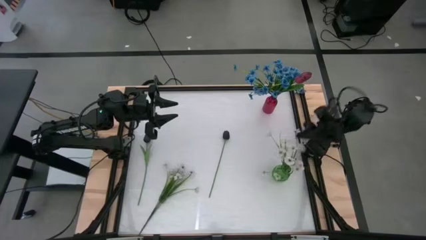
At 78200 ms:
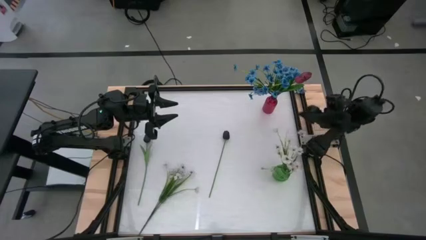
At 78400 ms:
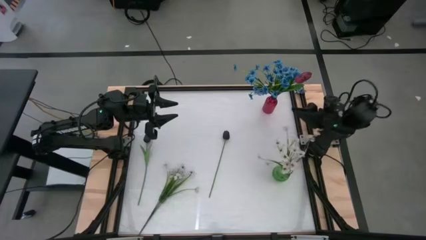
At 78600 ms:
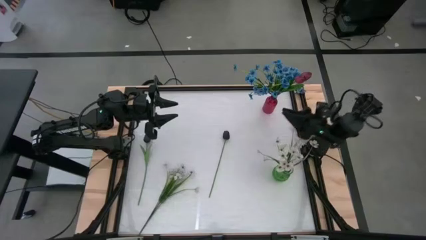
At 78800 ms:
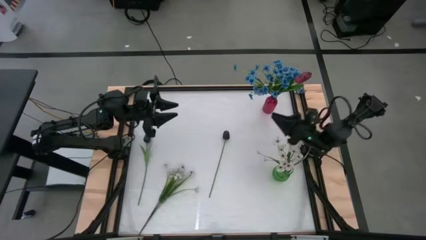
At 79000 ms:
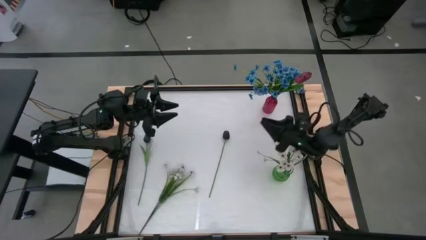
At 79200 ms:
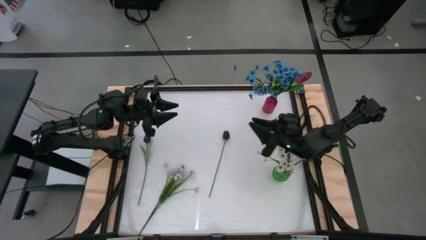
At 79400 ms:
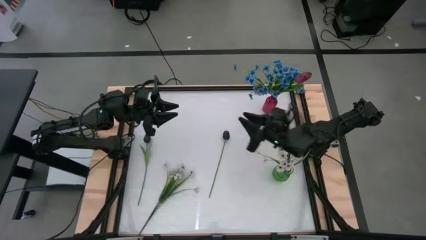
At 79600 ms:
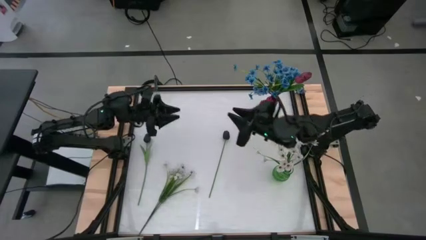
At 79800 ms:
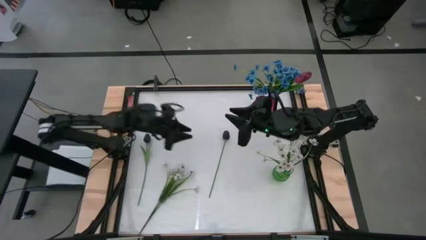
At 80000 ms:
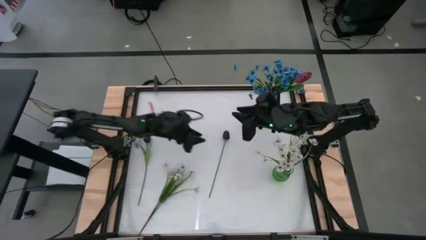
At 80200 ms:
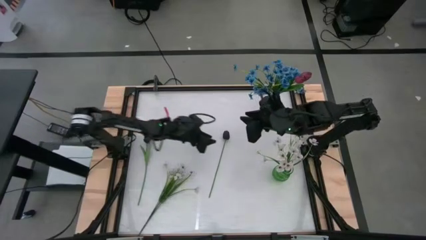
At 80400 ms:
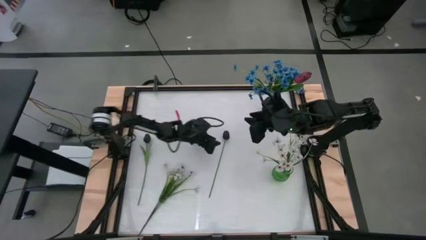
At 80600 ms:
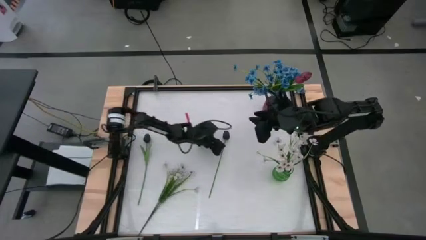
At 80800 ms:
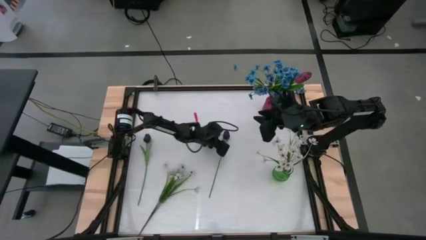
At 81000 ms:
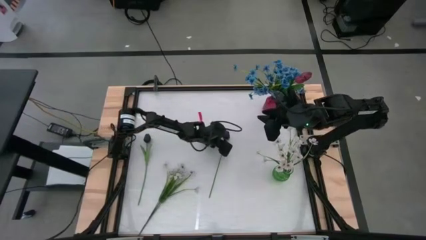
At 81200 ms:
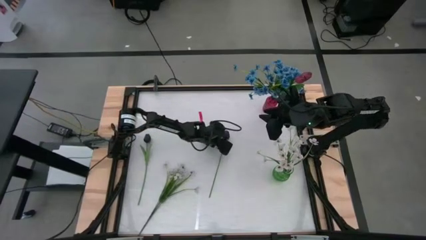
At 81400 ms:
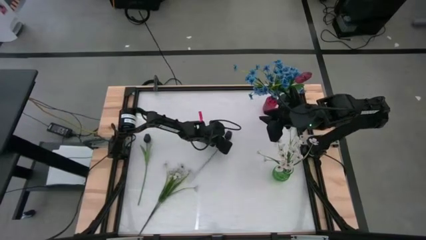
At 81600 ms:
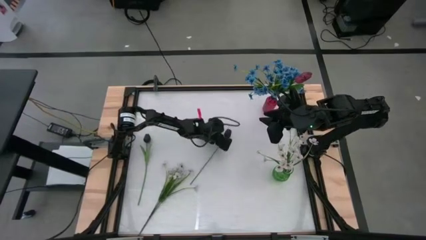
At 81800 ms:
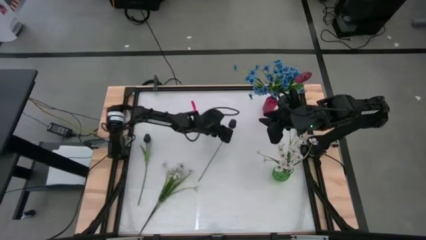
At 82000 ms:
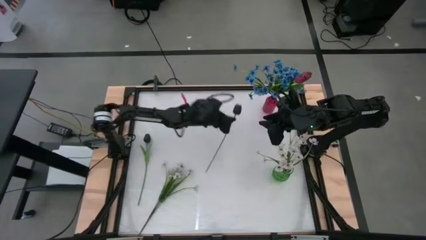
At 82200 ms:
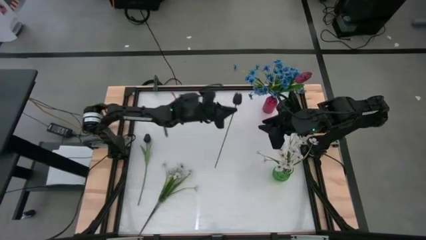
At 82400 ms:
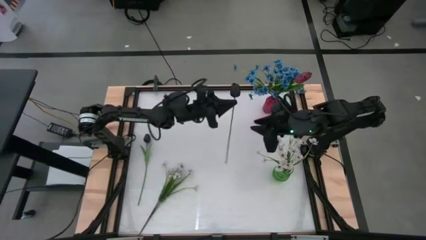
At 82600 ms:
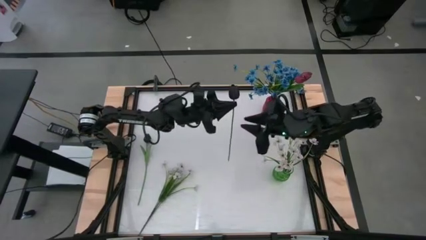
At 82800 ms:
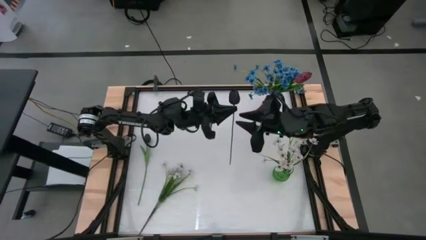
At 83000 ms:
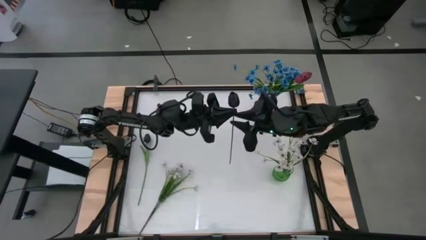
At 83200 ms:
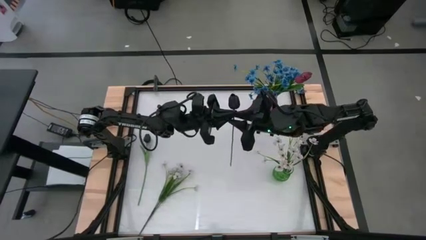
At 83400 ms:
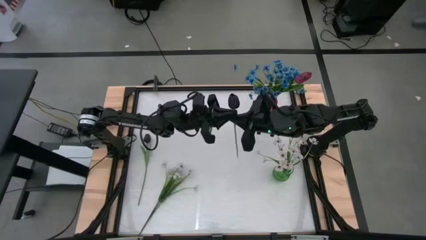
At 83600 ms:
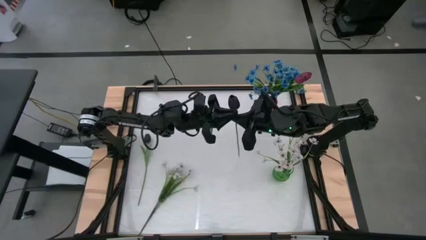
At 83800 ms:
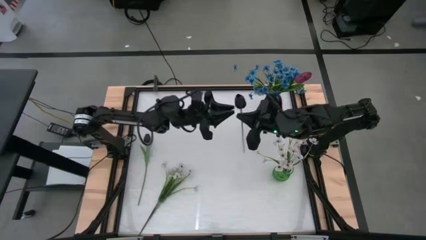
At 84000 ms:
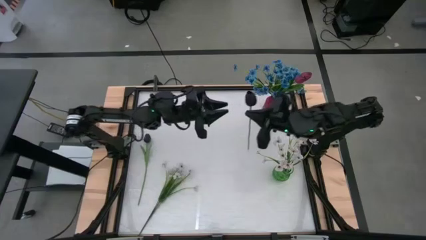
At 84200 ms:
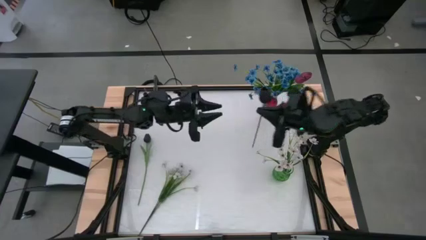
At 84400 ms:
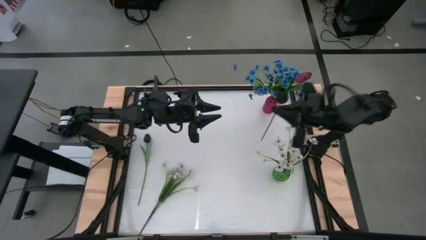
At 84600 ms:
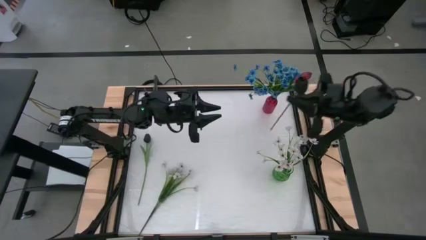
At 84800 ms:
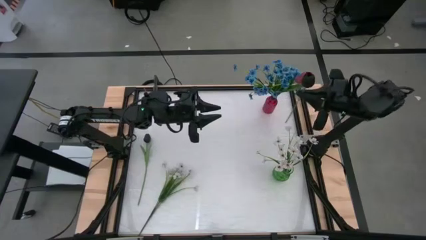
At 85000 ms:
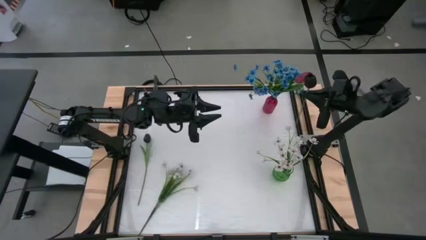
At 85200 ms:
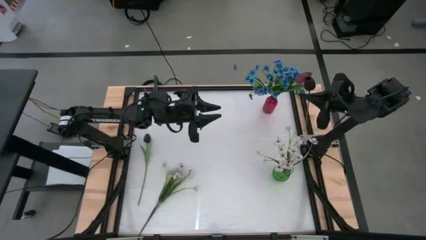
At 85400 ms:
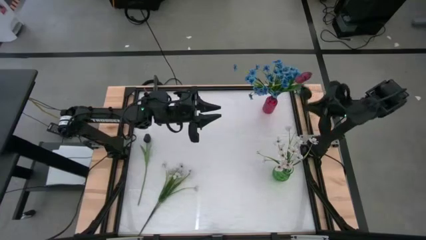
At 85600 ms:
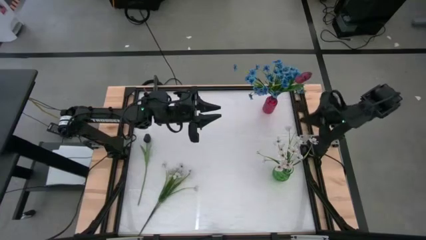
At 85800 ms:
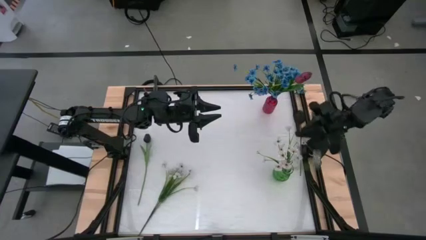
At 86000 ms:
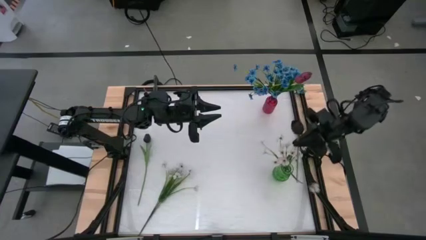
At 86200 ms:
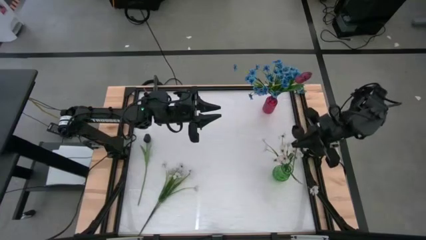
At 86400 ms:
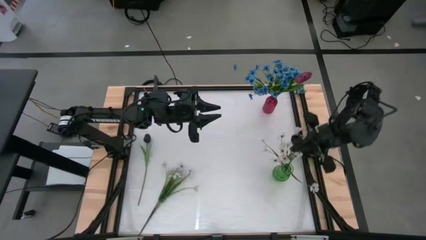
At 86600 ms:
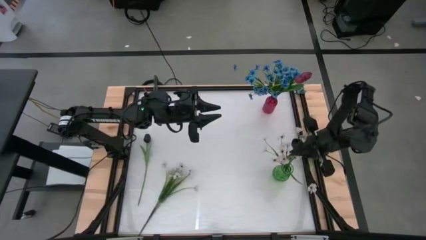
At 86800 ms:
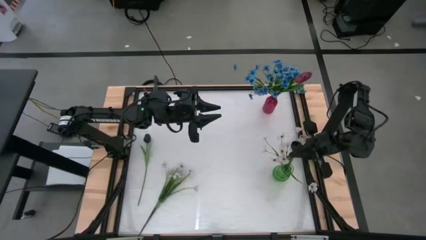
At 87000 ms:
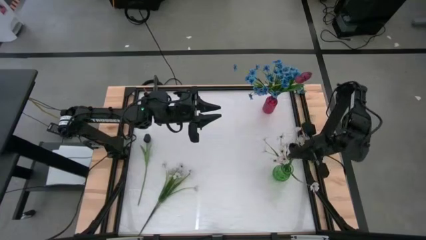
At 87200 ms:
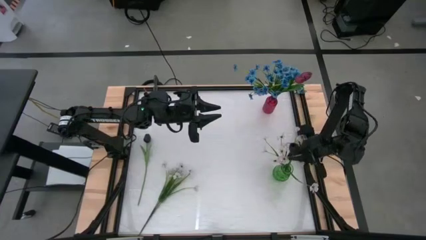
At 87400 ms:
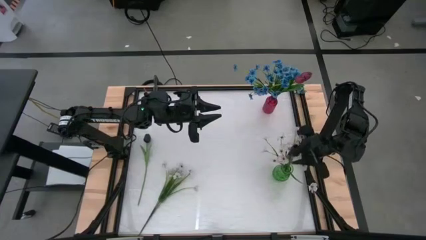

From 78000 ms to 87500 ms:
Task: Sort flowers into vase by color
Put the right black flower into the green vase

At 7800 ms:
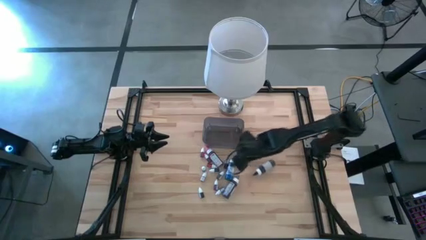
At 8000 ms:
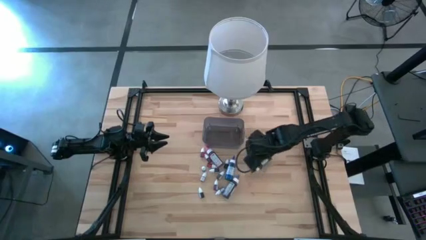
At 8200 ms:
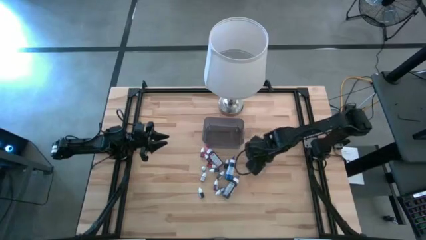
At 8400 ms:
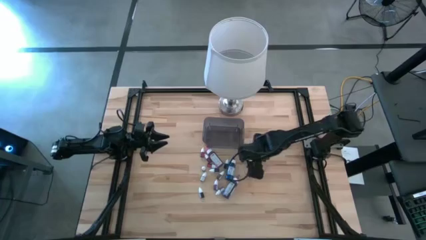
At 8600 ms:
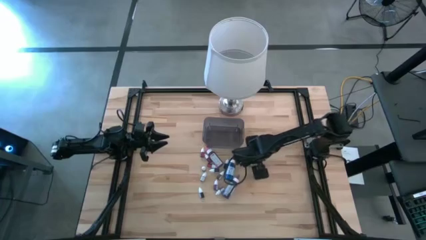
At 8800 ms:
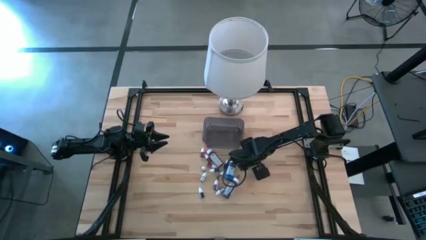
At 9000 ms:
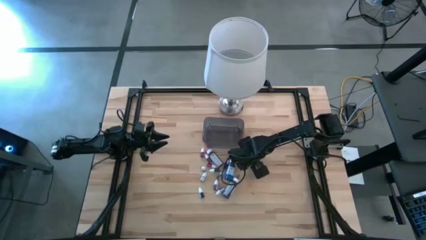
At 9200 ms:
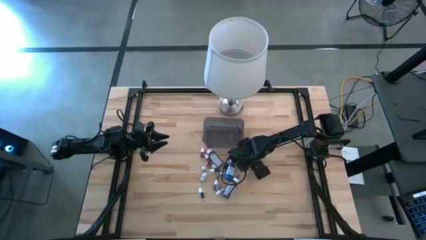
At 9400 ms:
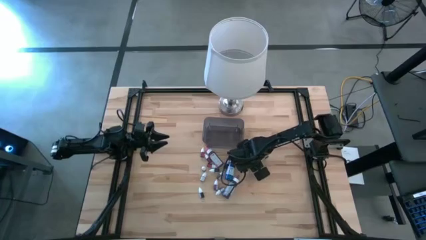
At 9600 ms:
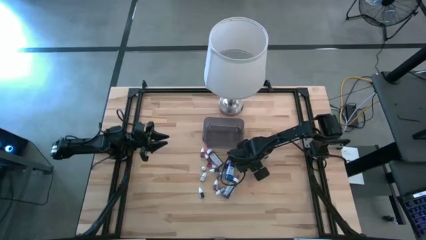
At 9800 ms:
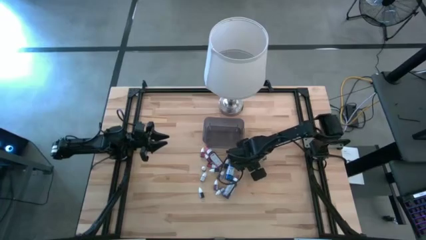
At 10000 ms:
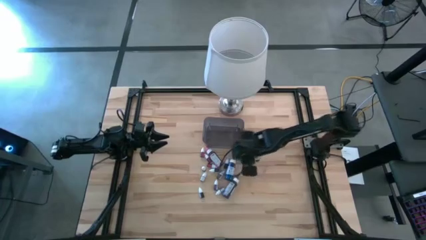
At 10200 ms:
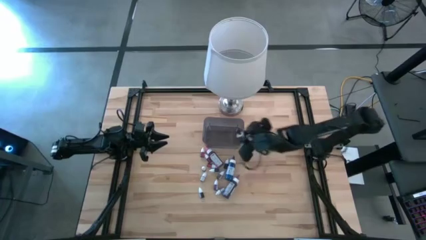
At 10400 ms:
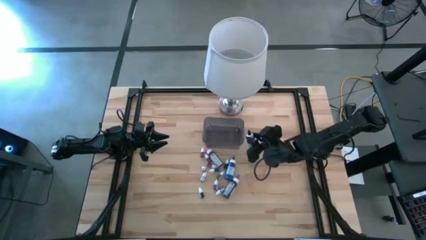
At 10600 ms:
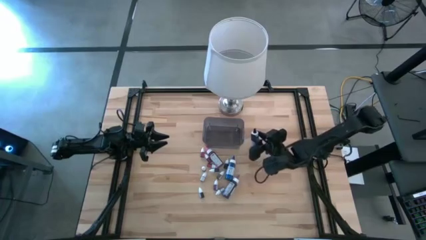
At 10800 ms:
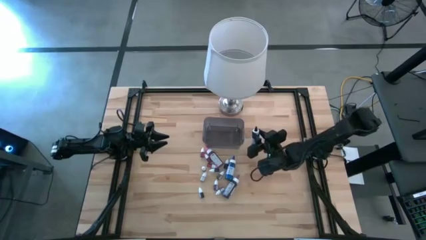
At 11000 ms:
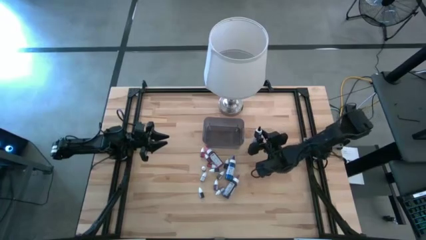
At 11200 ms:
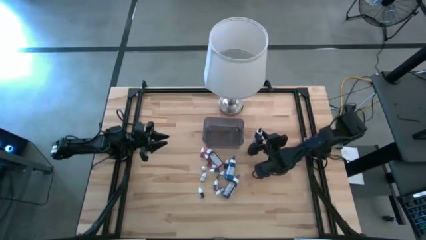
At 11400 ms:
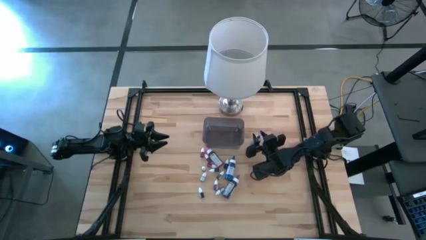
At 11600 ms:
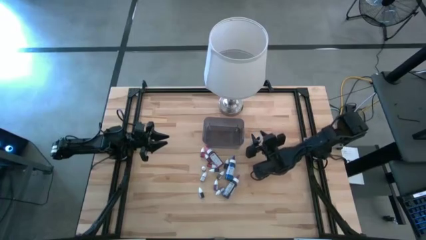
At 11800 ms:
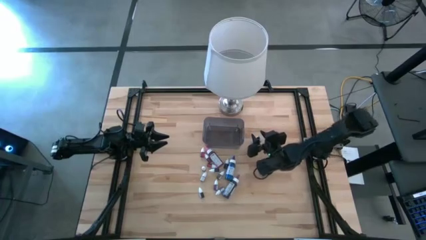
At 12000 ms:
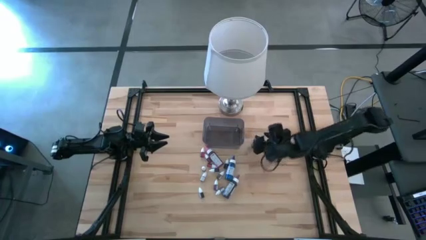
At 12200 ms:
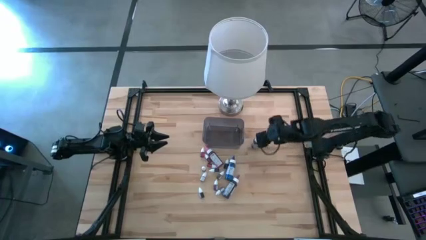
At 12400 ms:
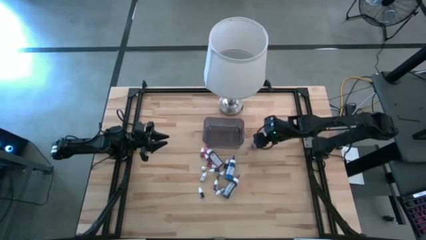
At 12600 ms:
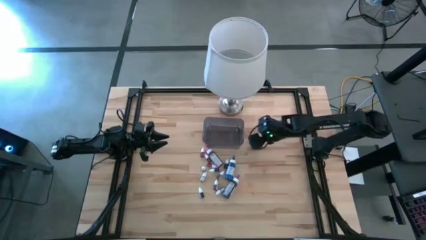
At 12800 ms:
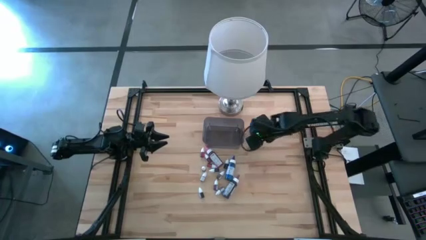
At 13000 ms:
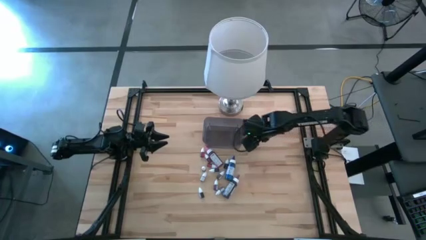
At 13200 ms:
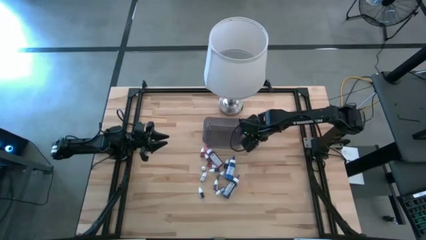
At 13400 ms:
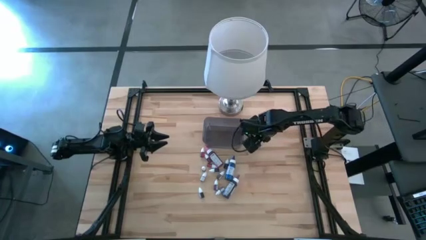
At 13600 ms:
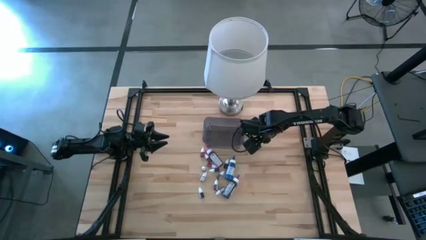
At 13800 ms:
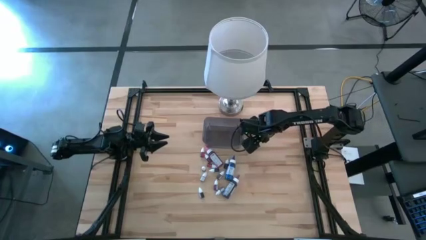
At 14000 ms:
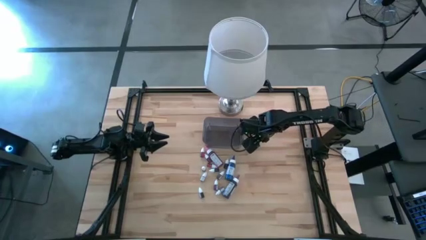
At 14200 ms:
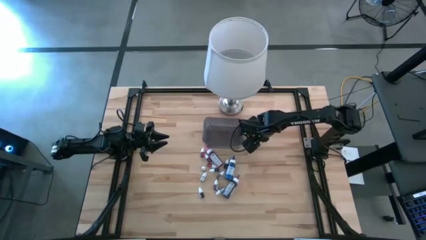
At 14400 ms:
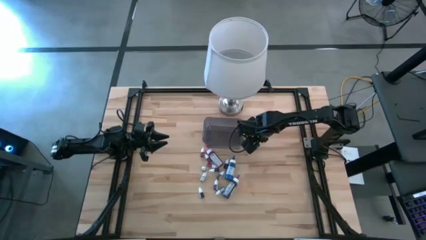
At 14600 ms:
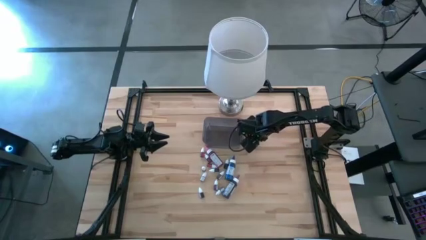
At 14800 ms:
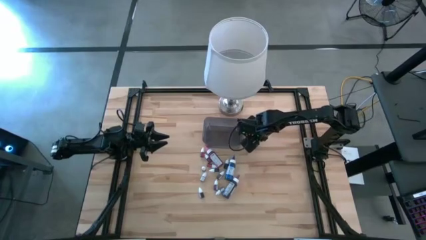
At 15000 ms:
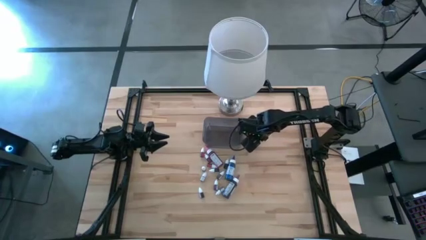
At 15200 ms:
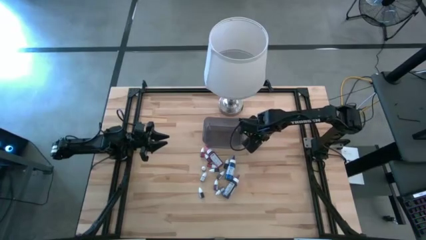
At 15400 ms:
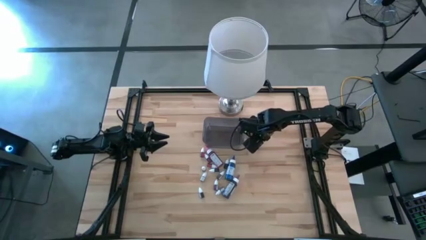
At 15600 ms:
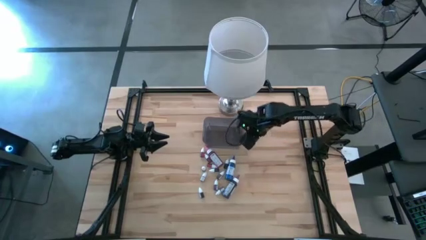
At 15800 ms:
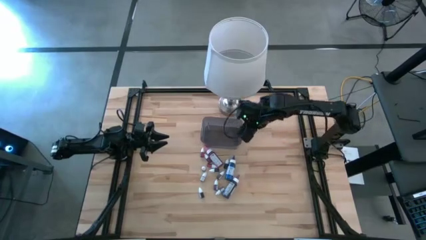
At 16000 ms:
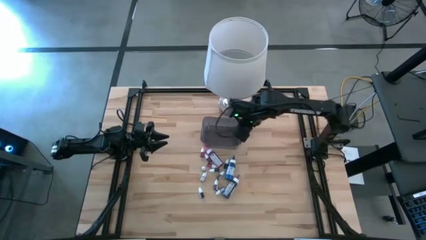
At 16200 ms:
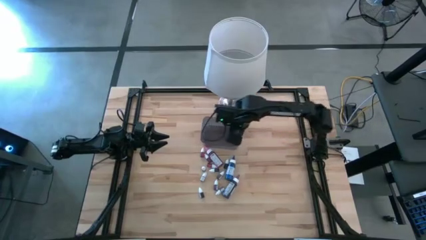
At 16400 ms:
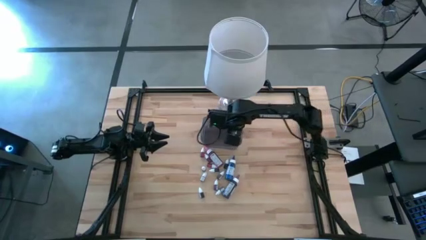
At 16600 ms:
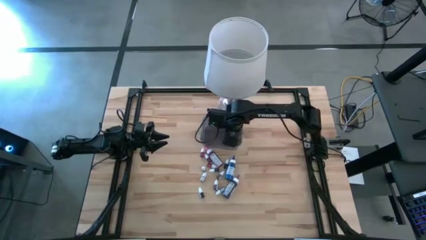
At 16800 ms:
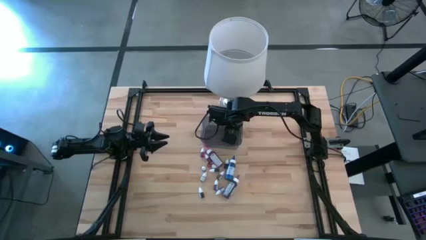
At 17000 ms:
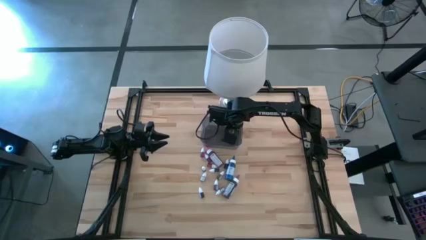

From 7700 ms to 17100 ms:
Task: Pick & Place food coloring
Put the big black food coloring bottle into the black bin
